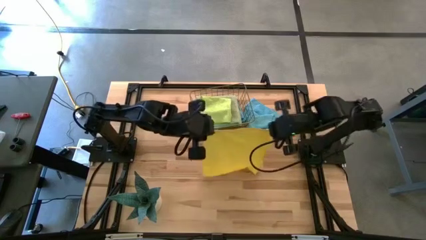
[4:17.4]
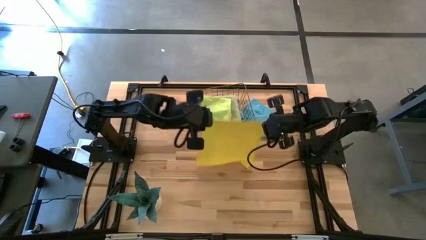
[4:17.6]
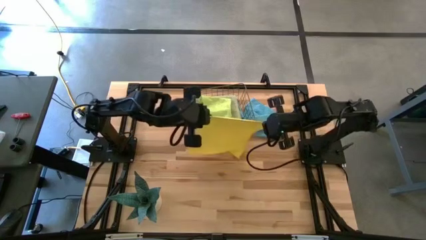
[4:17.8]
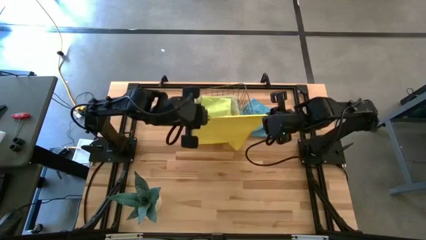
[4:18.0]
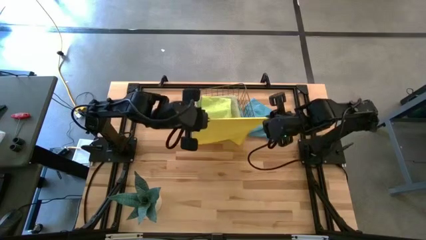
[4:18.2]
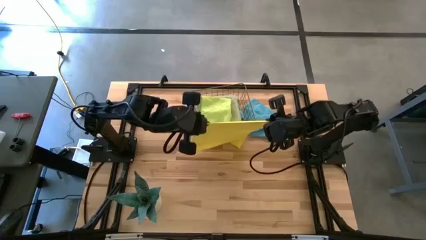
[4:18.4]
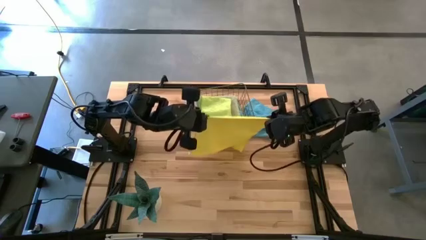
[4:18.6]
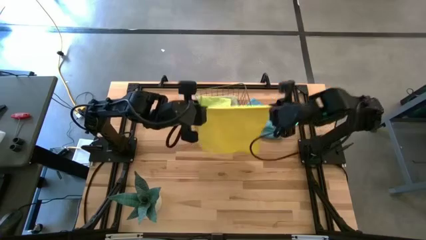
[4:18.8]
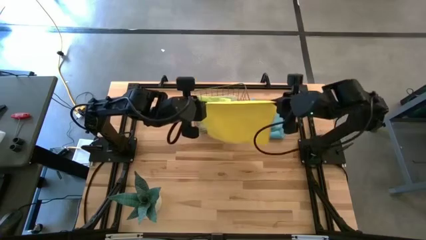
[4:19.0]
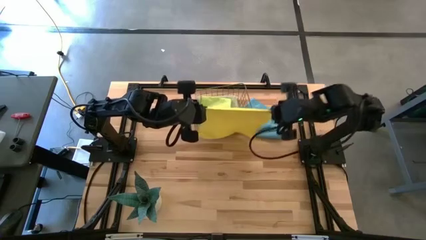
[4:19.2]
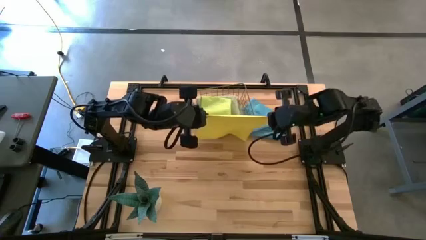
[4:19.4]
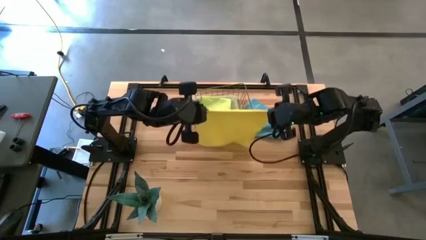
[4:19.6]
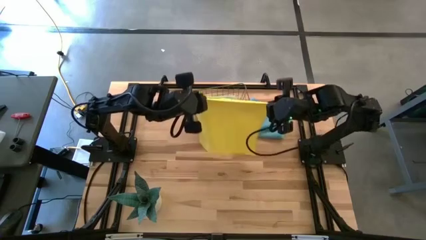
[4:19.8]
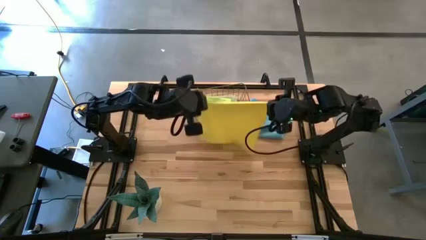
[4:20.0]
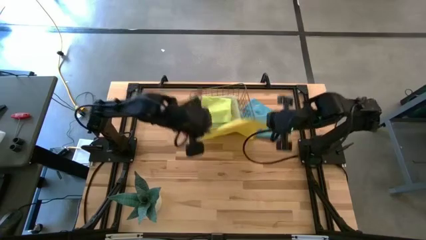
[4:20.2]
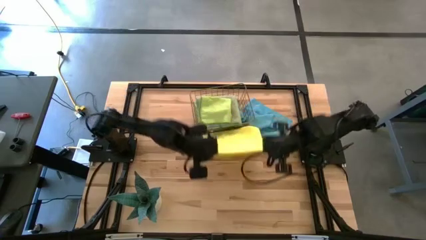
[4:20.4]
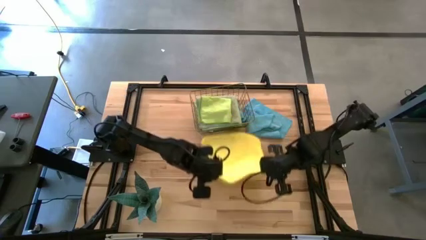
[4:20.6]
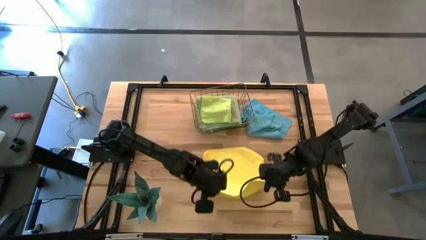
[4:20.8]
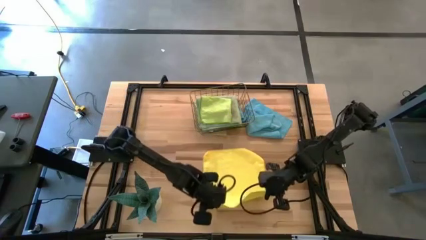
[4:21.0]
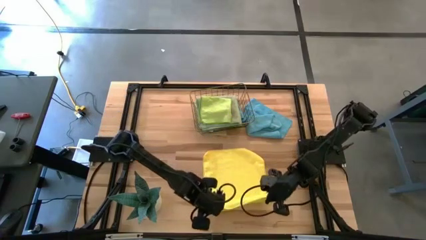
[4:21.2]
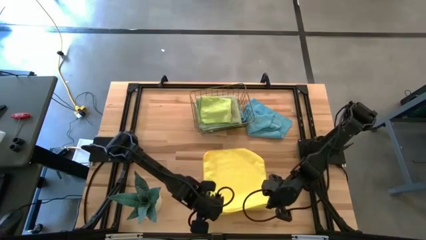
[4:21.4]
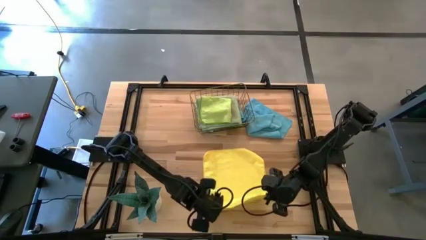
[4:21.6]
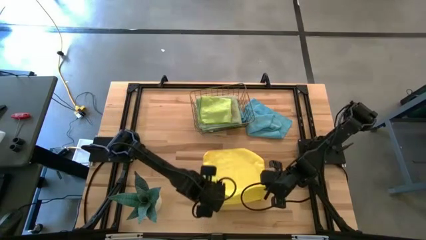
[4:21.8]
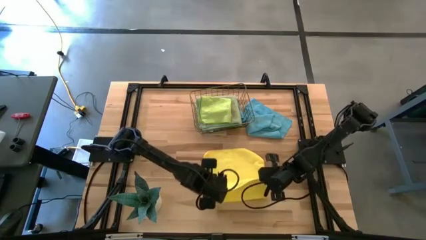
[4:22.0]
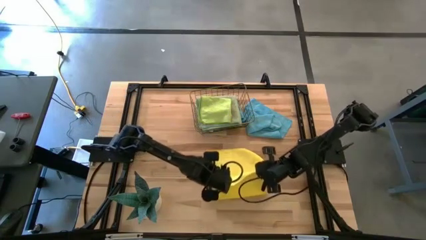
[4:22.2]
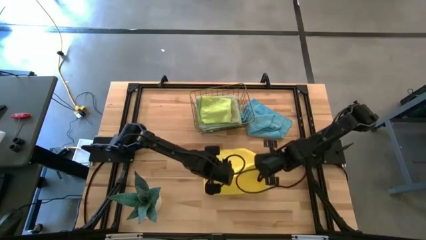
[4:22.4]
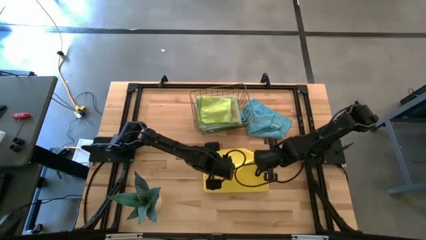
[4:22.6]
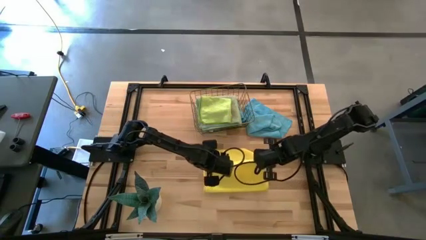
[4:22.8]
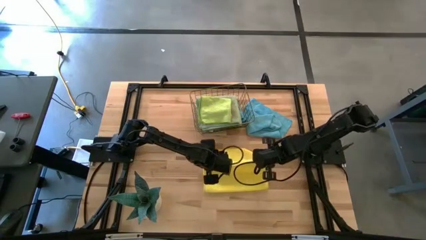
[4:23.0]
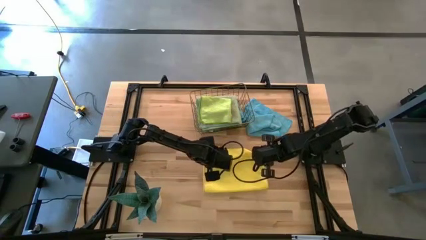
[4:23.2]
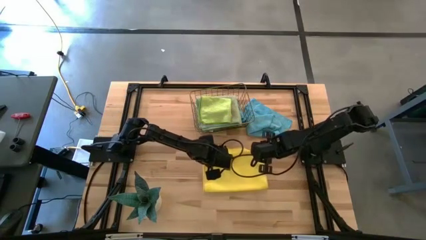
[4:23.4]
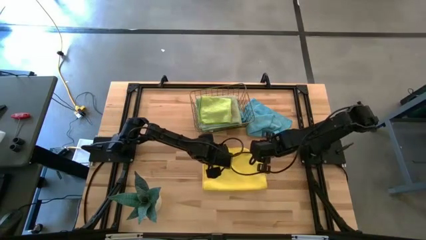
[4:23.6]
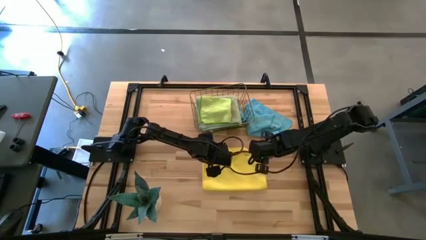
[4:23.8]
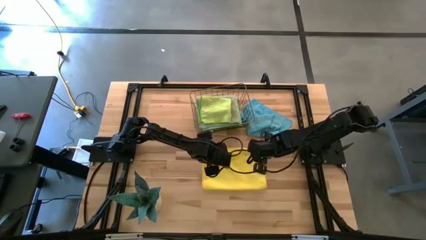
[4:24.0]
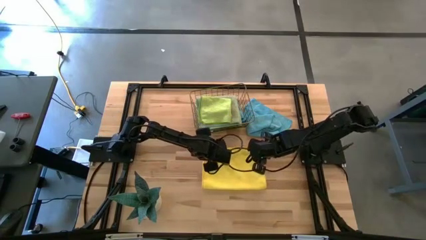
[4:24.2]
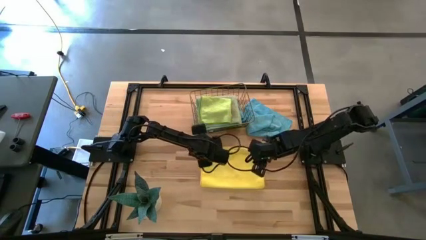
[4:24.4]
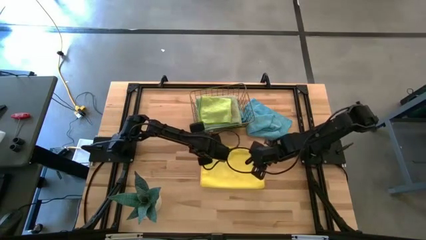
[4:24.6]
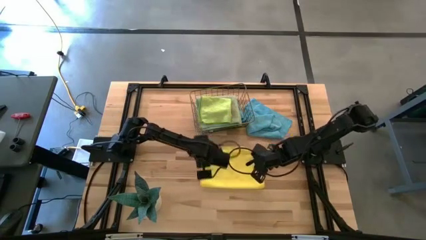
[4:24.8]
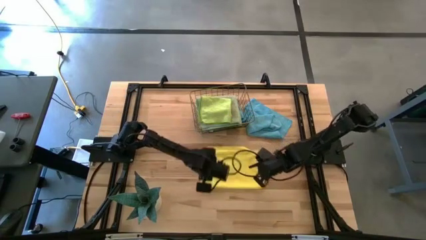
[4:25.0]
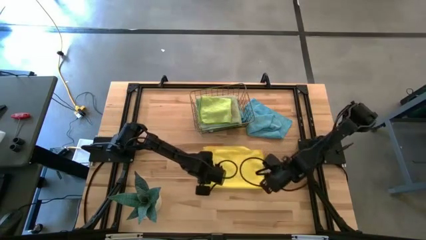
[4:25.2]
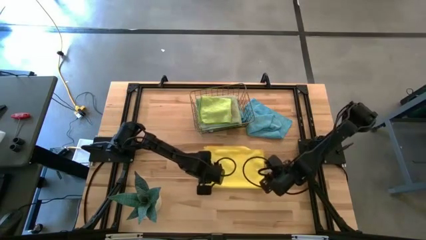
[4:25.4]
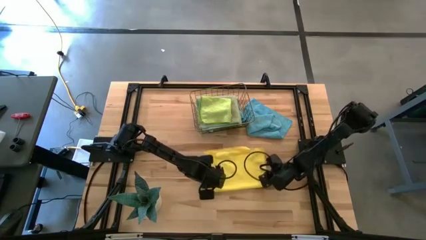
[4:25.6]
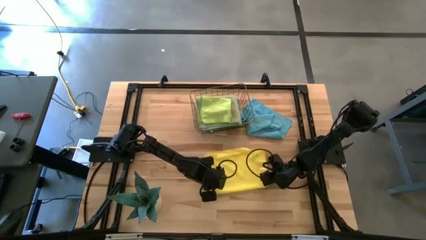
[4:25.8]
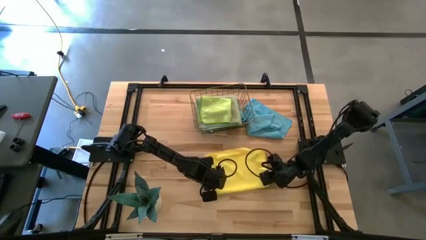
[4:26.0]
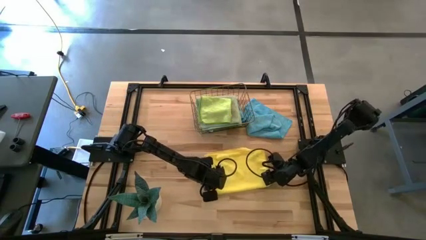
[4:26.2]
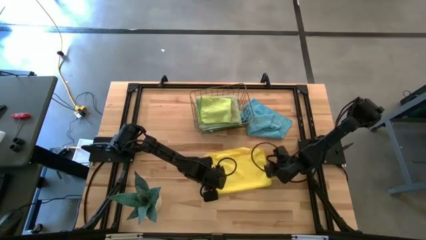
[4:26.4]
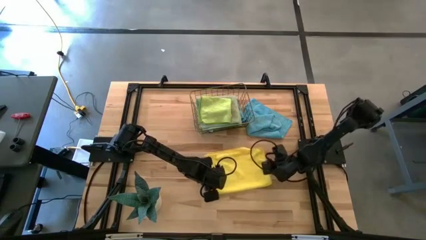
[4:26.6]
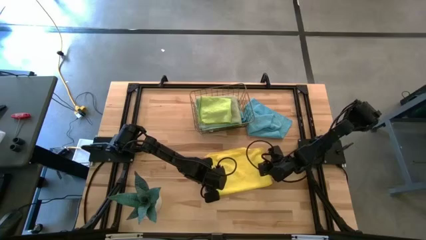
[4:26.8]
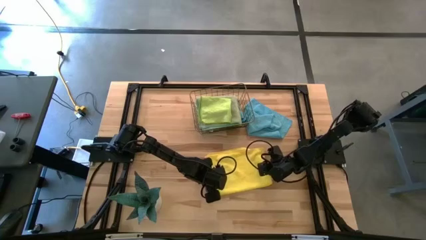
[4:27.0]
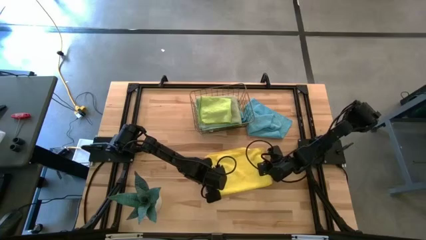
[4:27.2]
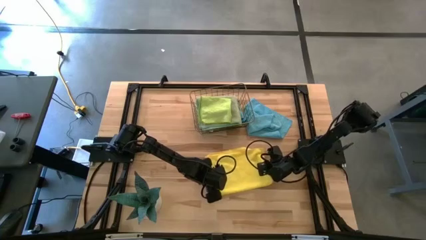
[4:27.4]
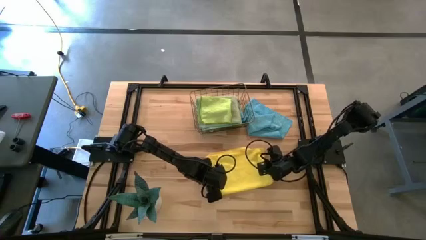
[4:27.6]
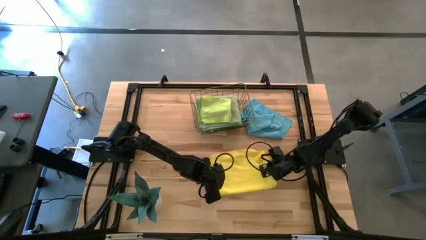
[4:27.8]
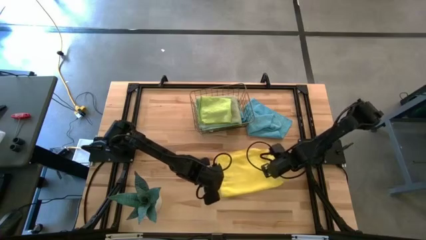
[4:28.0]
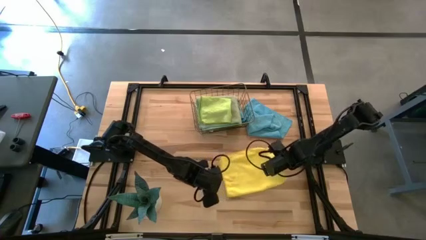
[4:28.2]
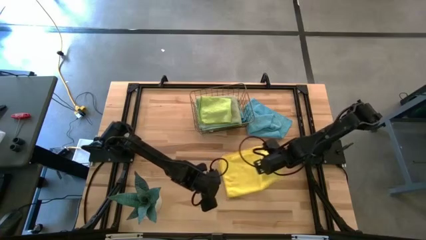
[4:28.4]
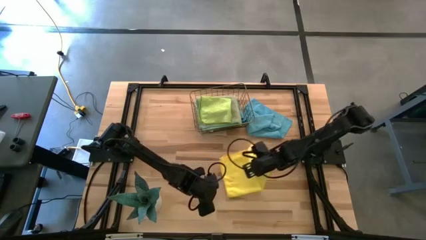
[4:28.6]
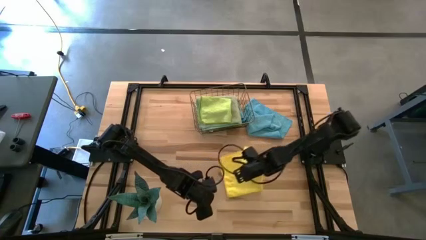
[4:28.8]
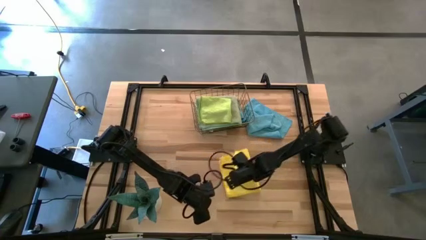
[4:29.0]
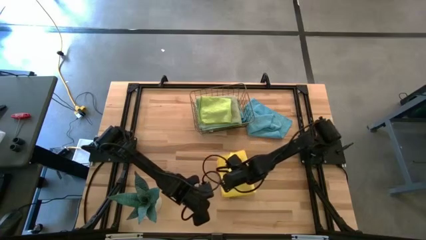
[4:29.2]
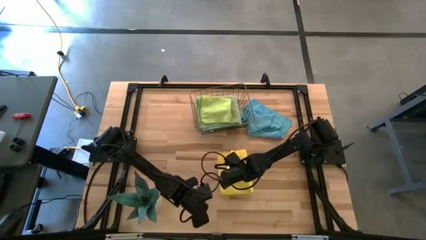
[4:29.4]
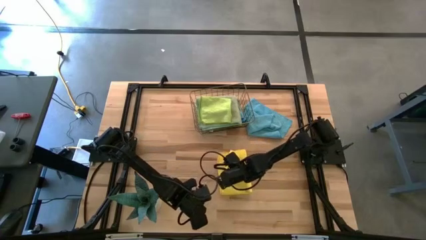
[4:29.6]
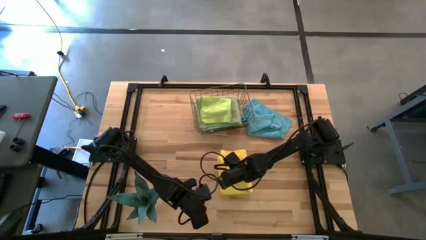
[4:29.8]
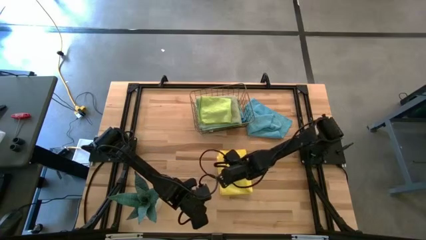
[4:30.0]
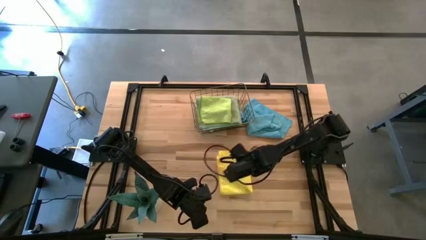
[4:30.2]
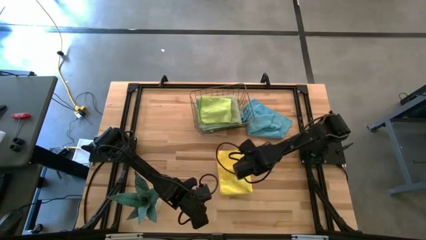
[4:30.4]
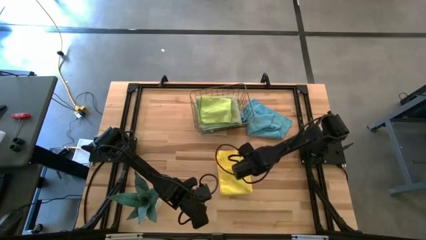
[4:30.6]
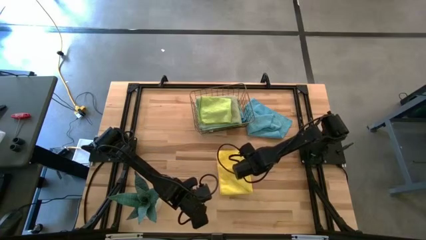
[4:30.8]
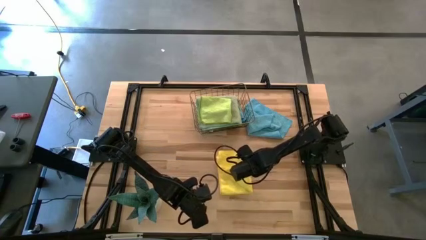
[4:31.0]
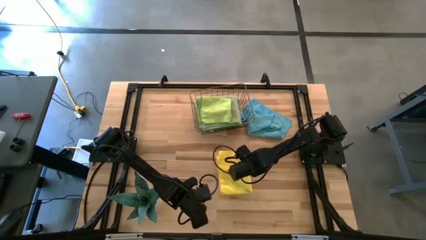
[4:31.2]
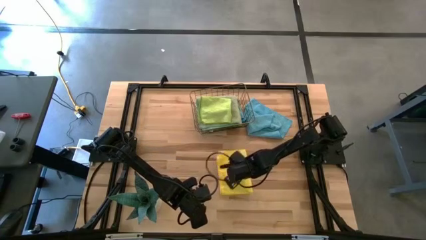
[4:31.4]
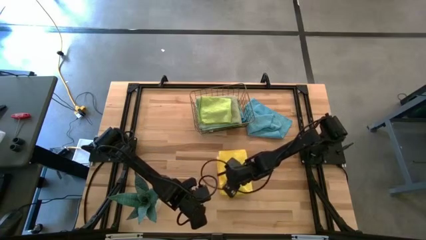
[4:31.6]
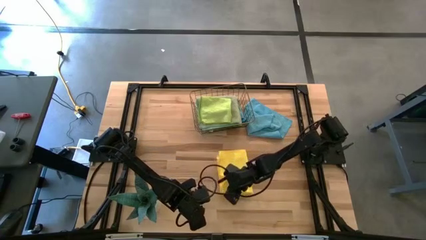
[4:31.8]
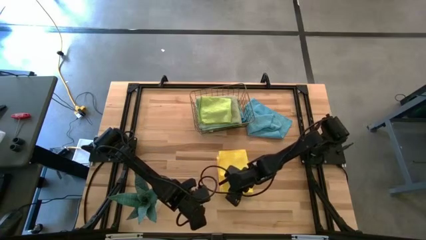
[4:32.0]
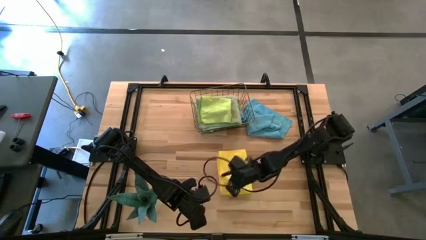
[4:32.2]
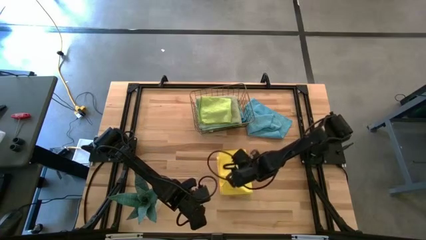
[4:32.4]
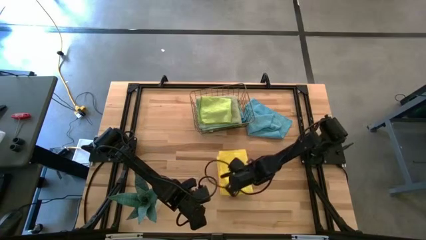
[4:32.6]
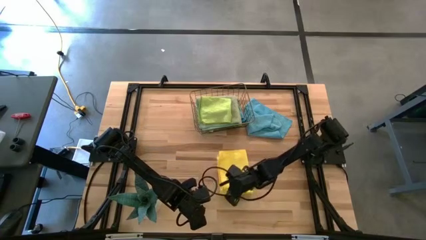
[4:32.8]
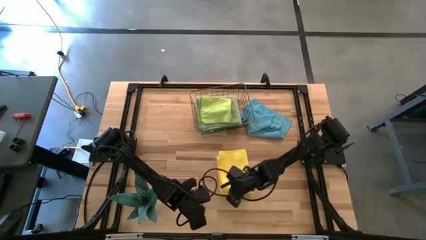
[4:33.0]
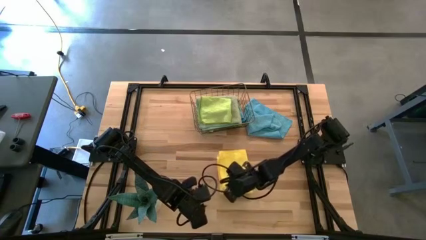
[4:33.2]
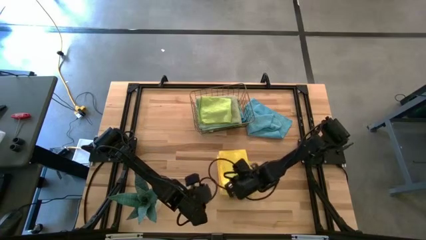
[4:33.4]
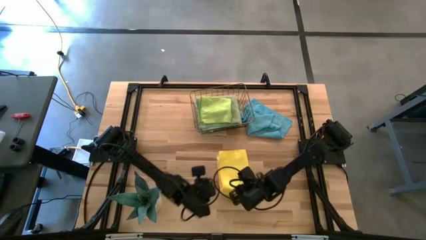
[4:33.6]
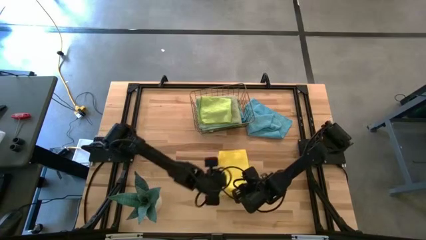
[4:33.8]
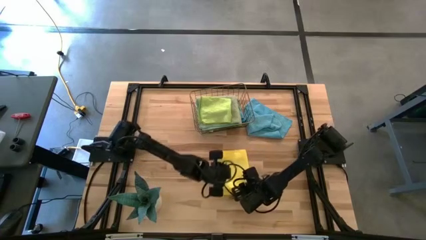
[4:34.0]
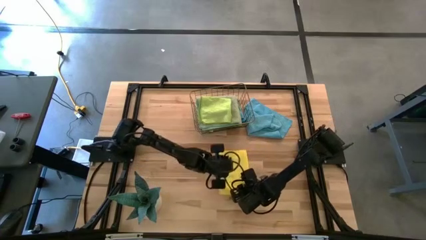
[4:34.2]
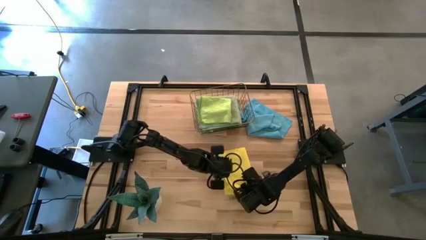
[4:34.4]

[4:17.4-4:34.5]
Task: Fold microfiber towels
Fold the yellow towel
